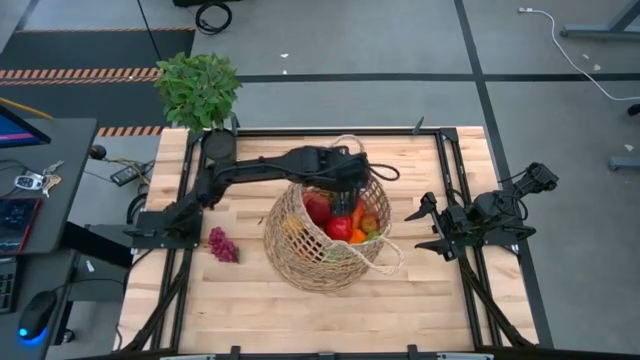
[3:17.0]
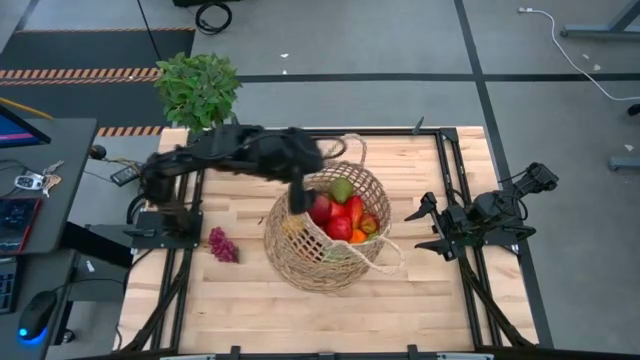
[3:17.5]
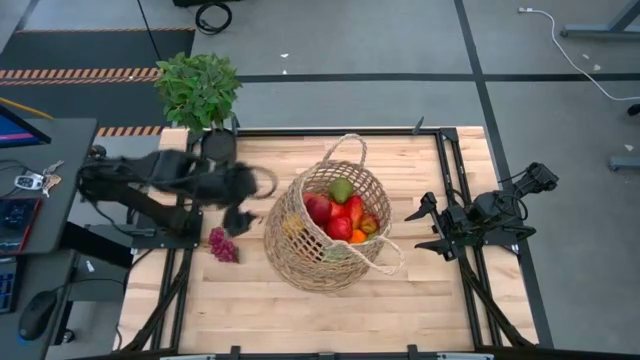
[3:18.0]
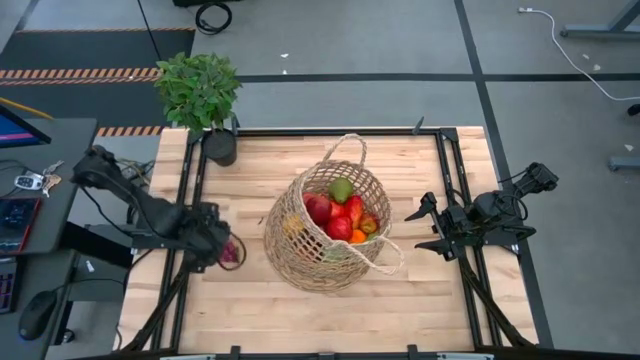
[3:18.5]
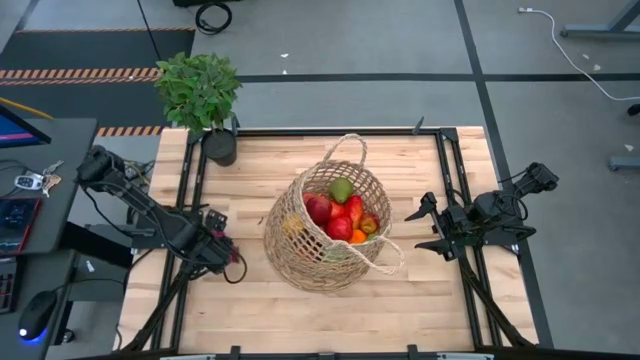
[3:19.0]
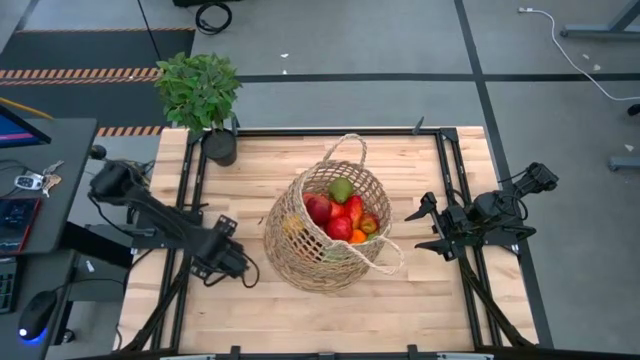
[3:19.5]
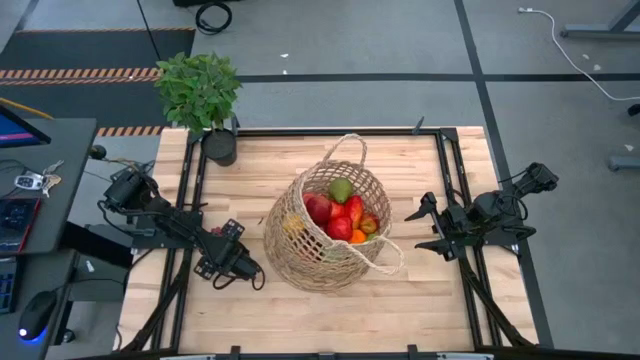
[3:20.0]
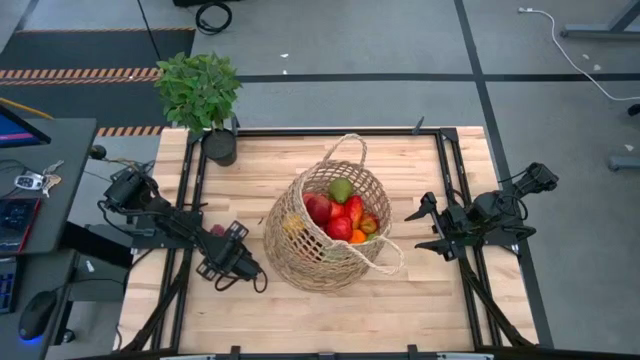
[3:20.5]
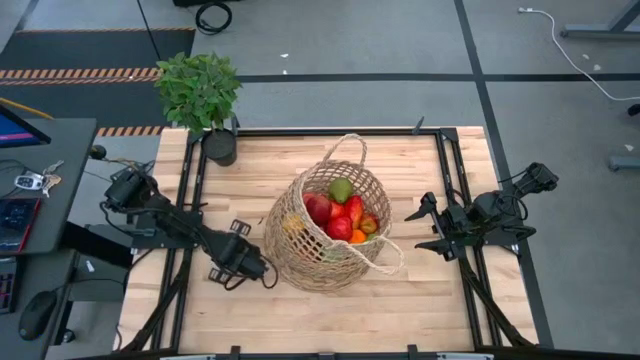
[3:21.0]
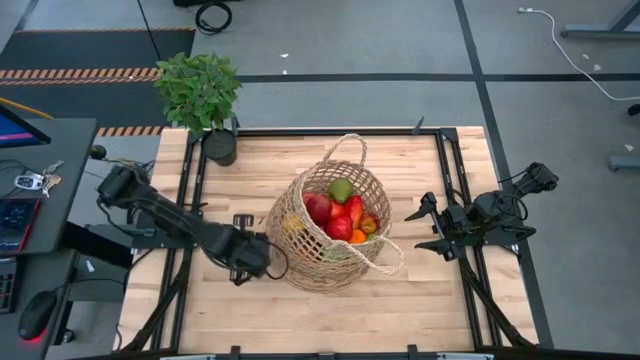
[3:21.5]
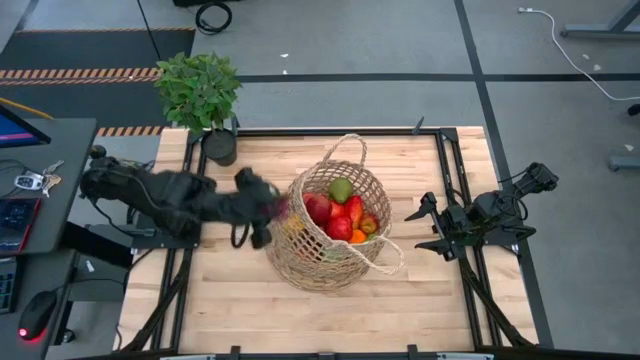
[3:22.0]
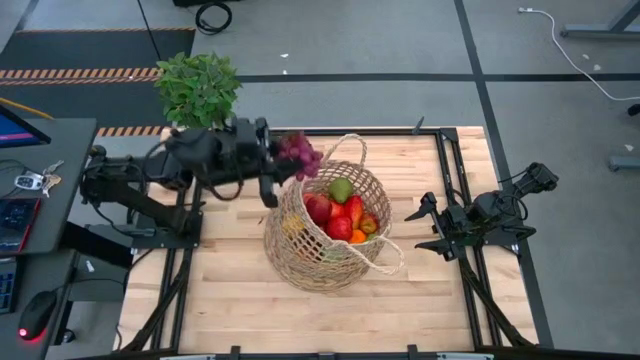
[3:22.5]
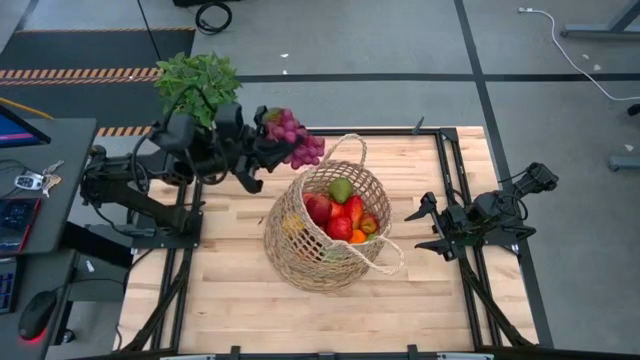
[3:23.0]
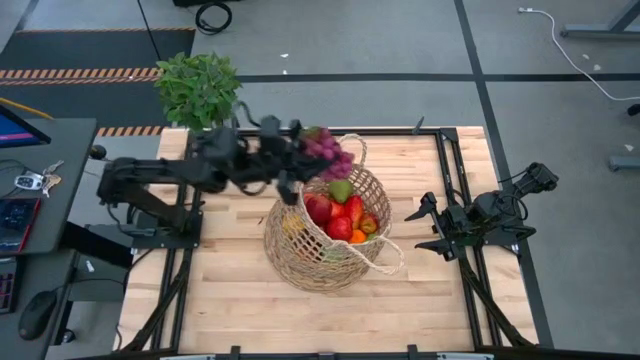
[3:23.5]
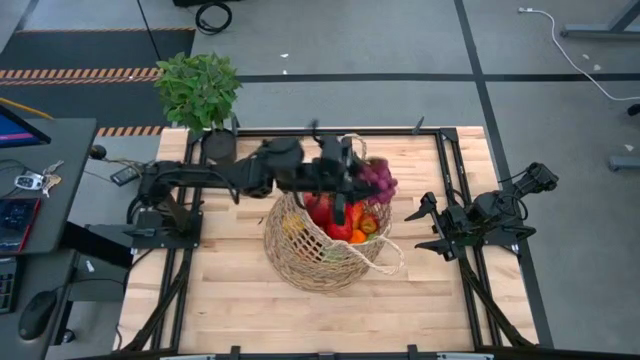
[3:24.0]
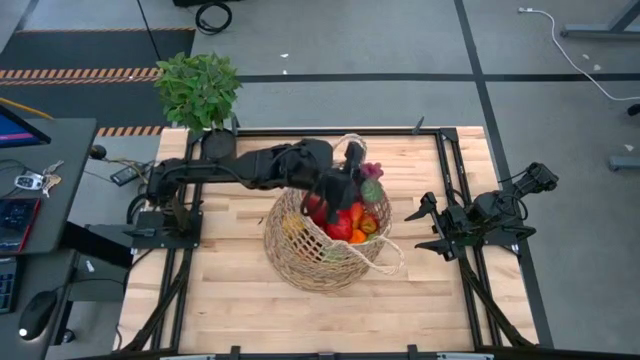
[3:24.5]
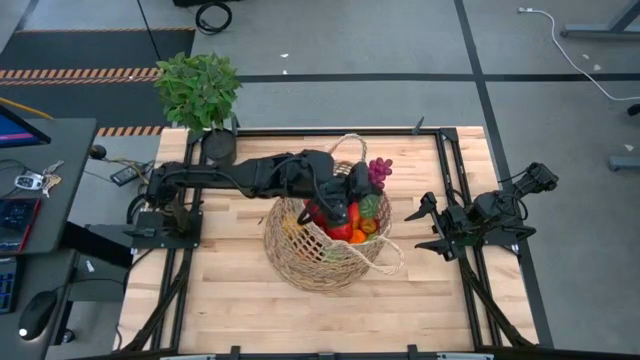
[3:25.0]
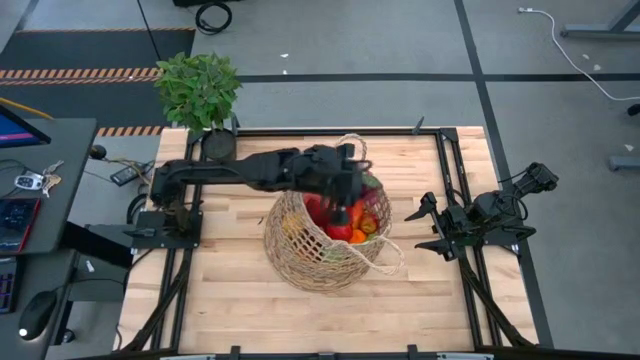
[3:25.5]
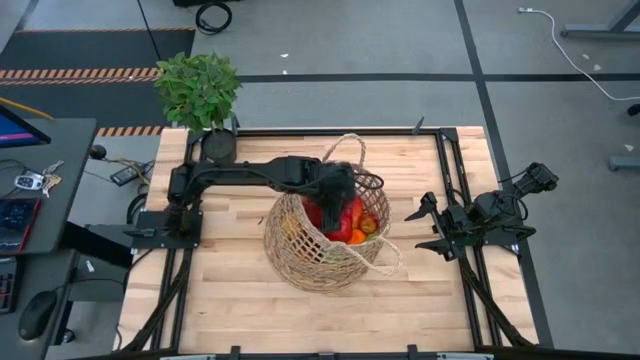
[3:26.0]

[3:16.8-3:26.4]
Task: Build produce basket
Put the violet grape into the brown basket

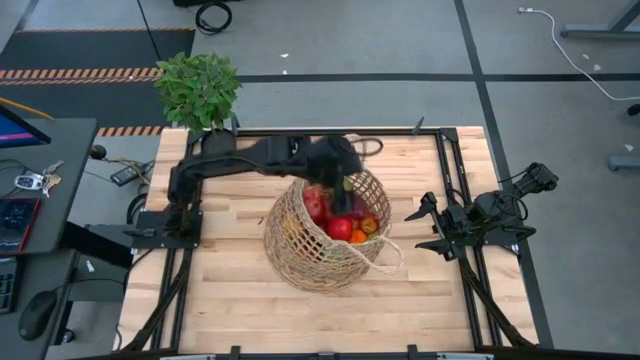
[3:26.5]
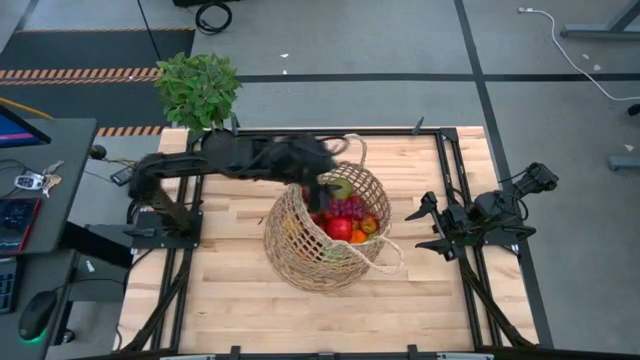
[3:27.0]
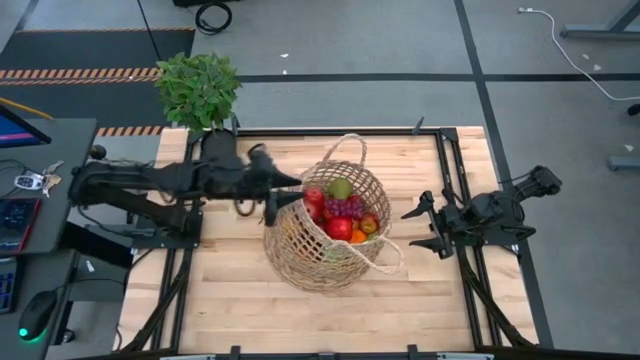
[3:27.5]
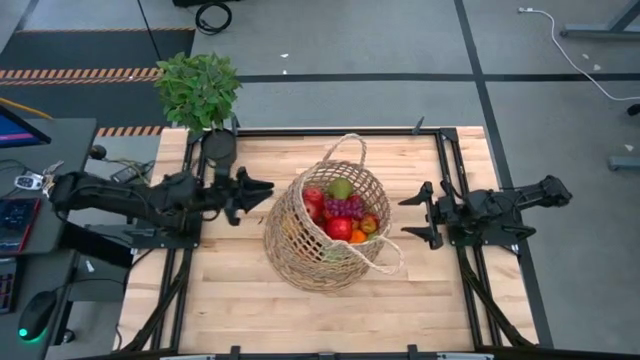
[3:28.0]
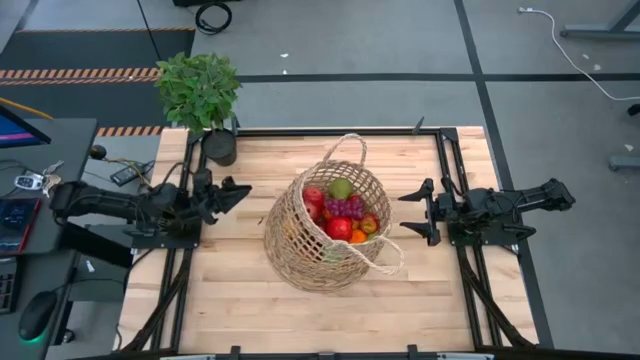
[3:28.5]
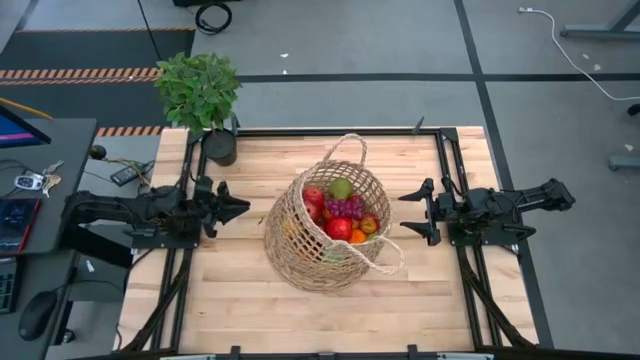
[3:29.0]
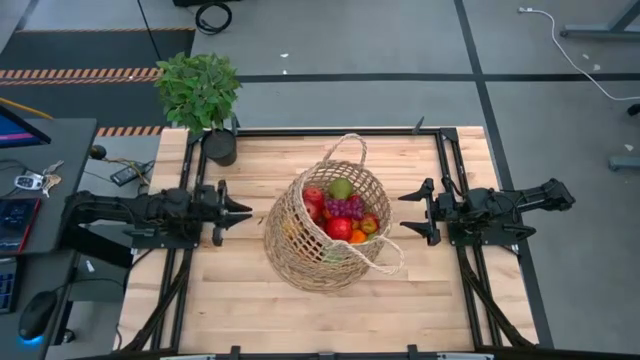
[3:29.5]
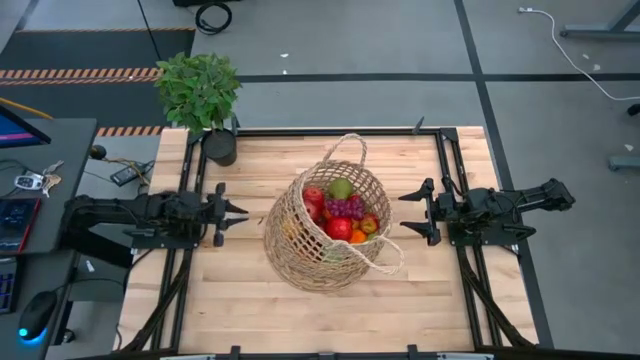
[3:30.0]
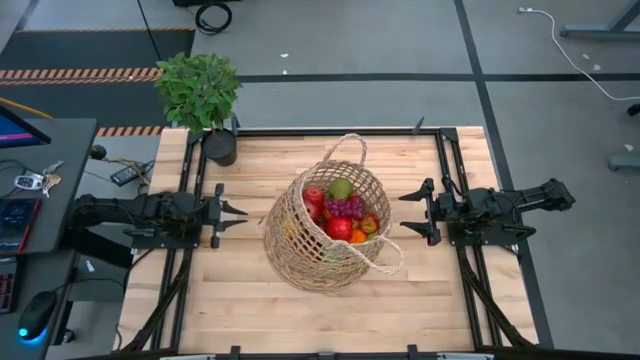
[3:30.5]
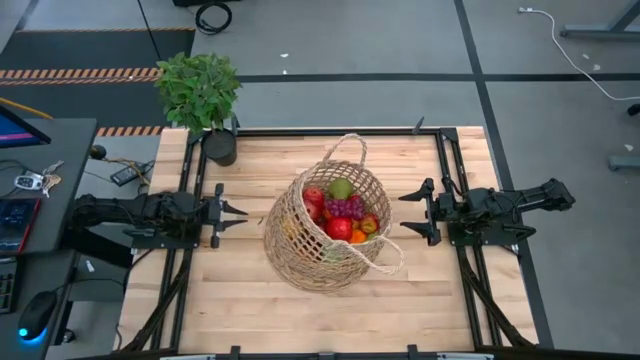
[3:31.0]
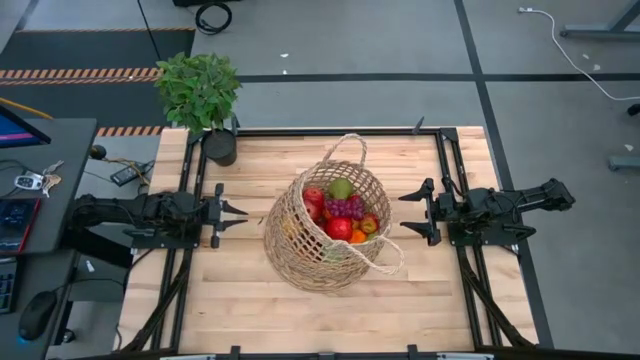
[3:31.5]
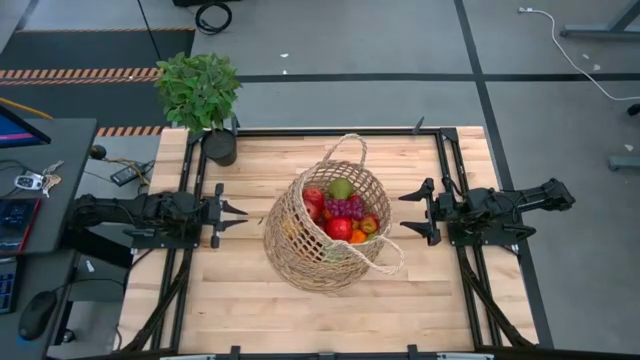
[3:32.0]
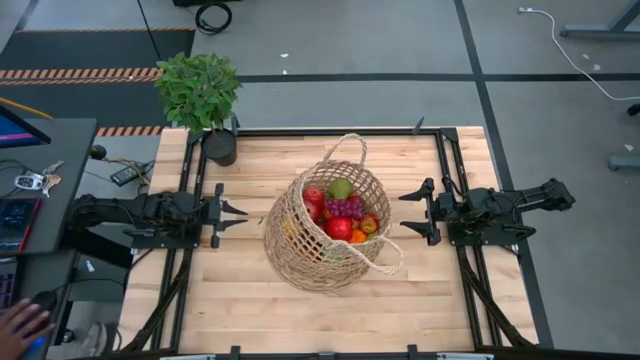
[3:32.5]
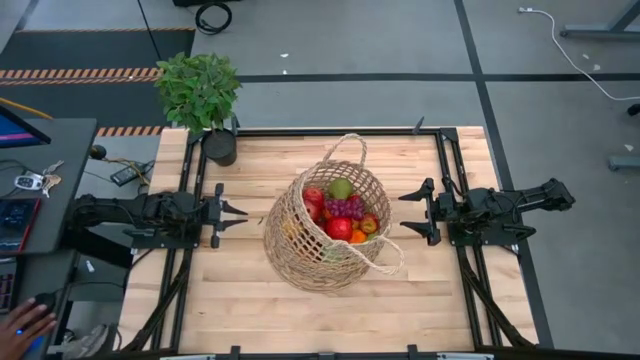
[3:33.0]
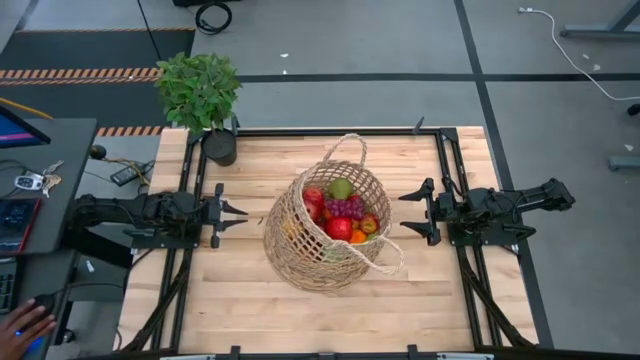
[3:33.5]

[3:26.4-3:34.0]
Return to Home Position

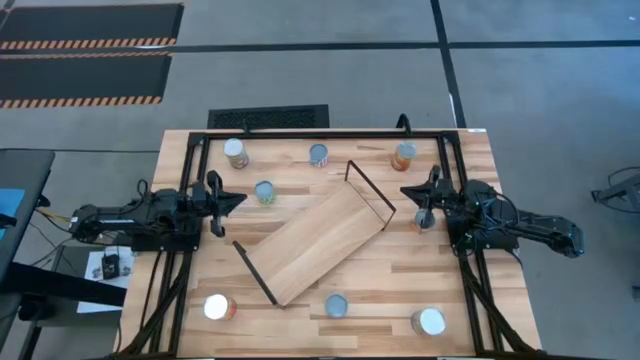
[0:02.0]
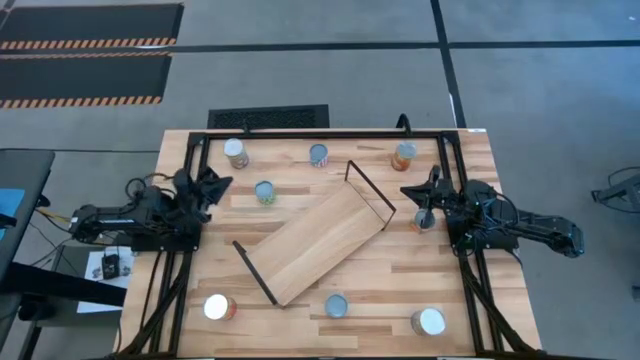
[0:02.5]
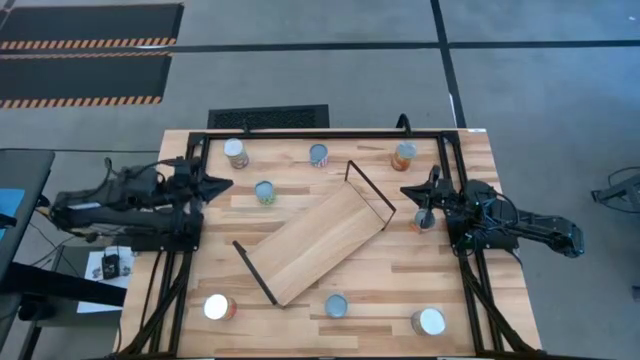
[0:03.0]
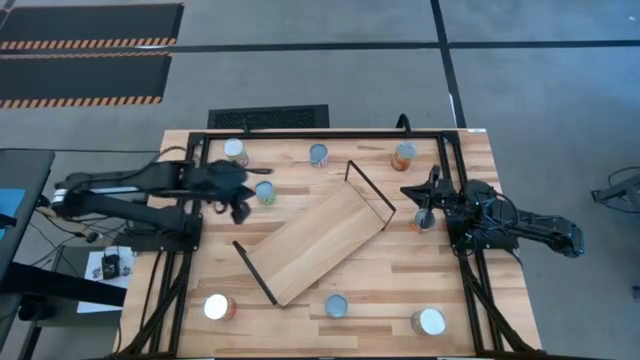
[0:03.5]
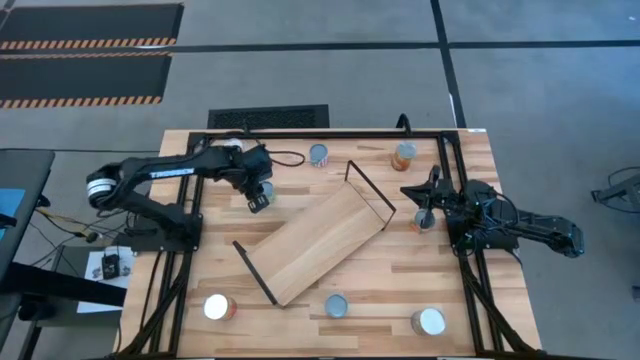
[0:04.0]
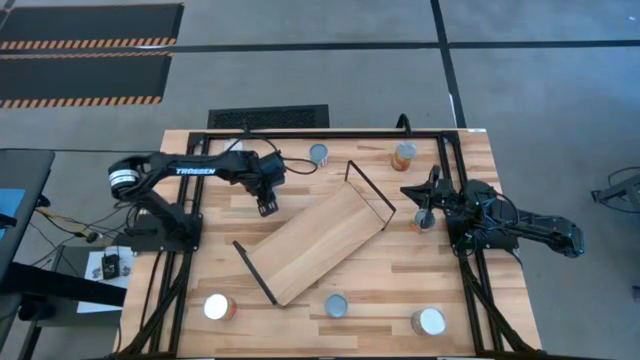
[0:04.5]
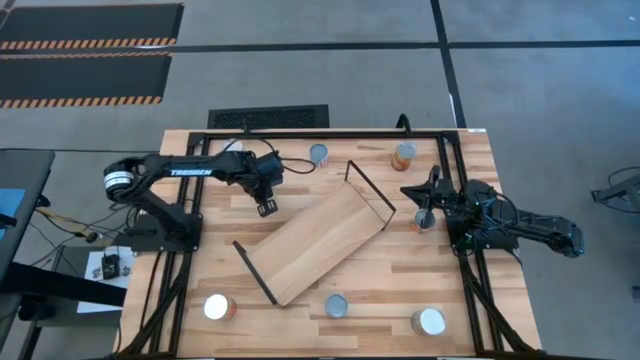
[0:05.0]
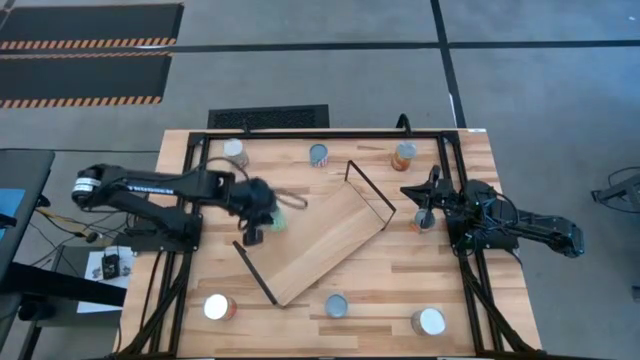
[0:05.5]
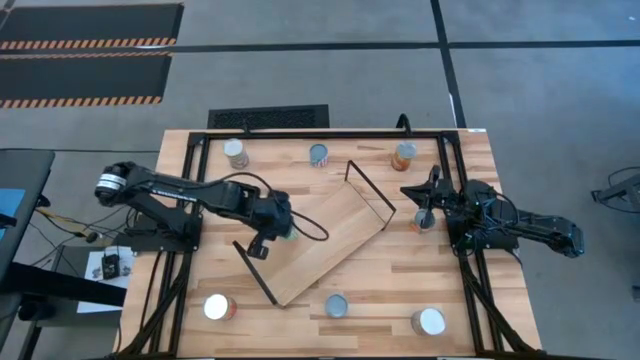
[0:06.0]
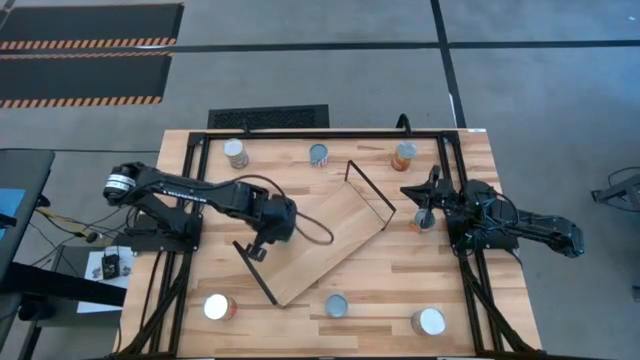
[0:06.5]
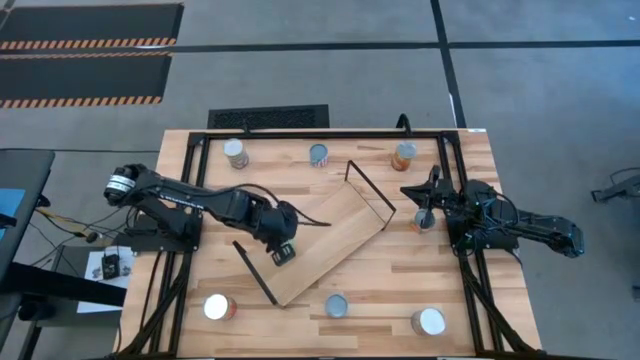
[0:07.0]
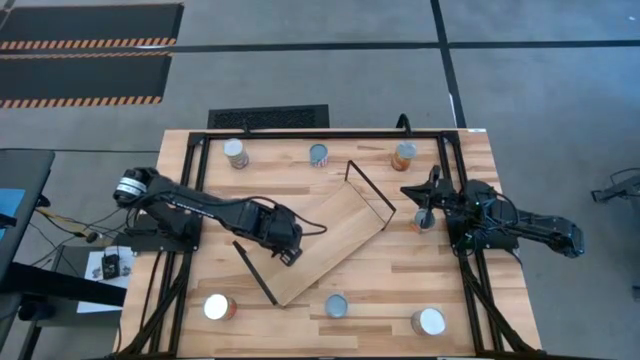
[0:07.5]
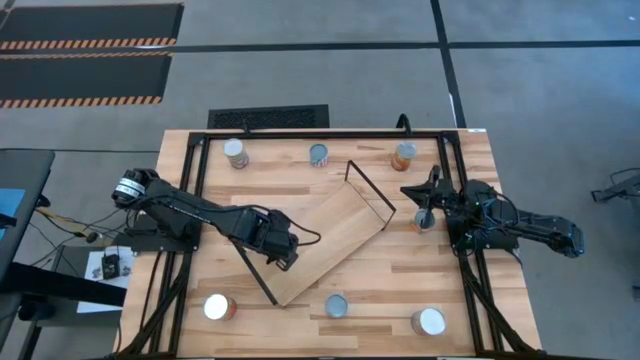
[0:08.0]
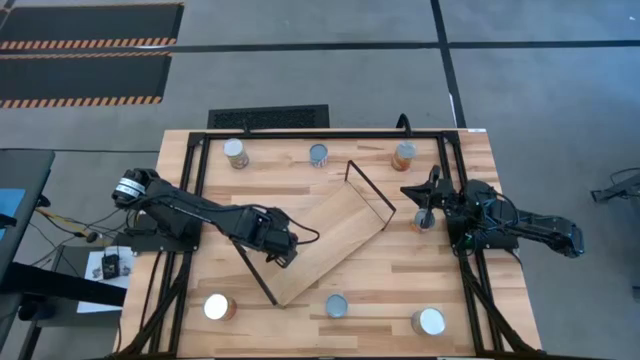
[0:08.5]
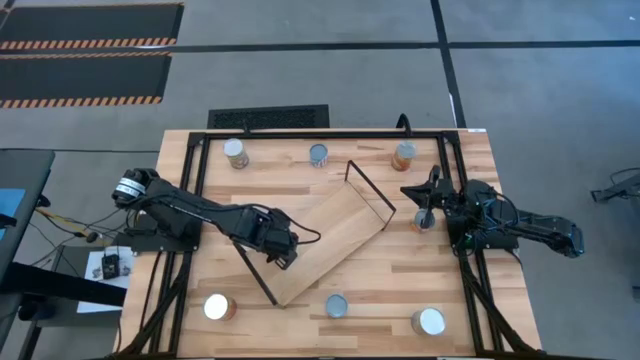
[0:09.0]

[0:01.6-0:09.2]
Task: Pick and place cans onto a shelf
Put the top canned peas on the shelf
